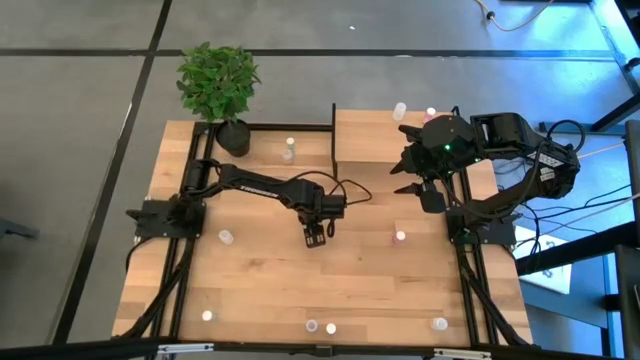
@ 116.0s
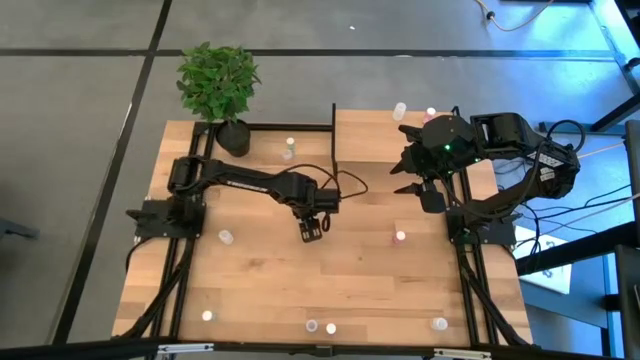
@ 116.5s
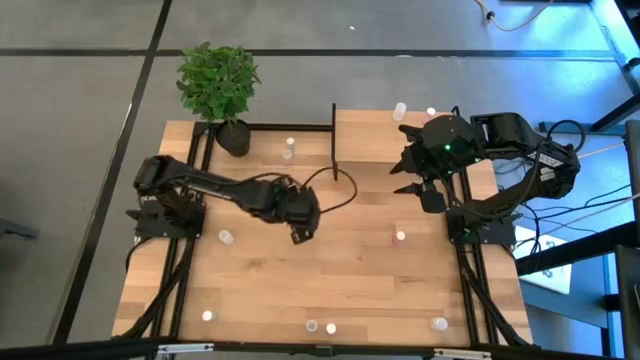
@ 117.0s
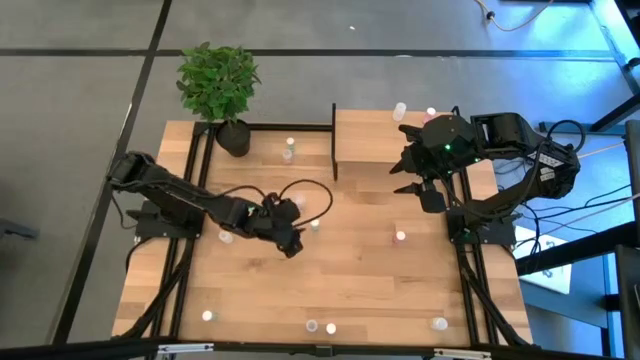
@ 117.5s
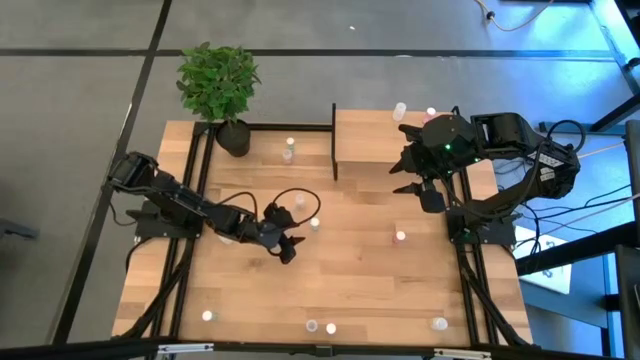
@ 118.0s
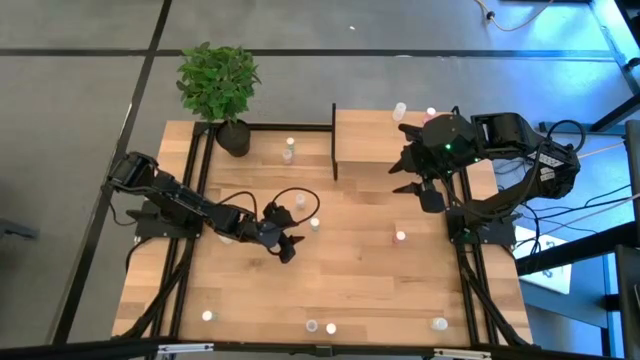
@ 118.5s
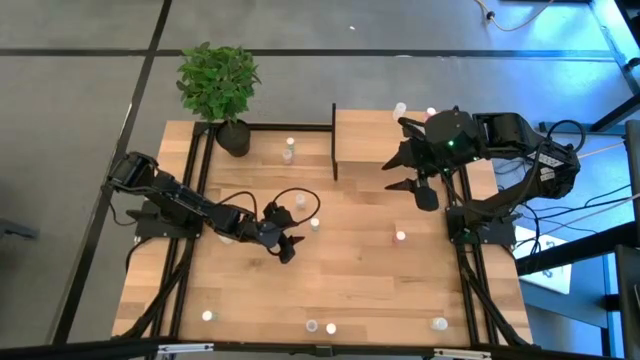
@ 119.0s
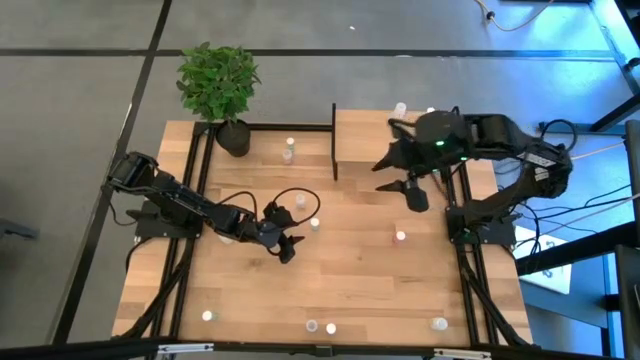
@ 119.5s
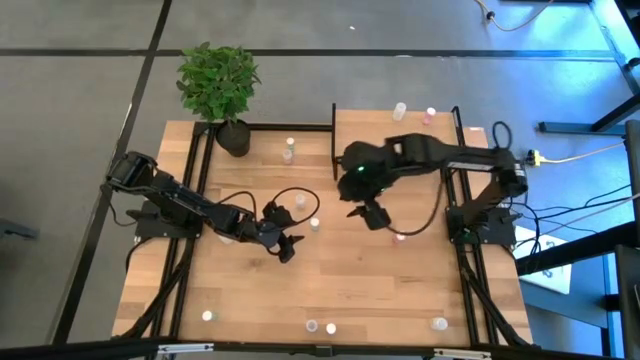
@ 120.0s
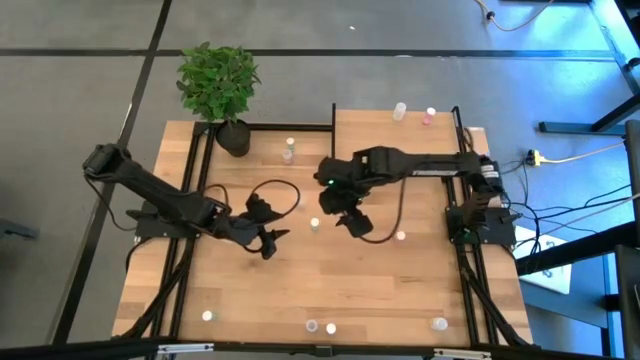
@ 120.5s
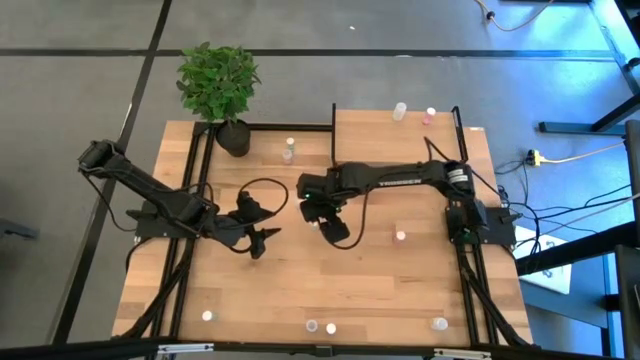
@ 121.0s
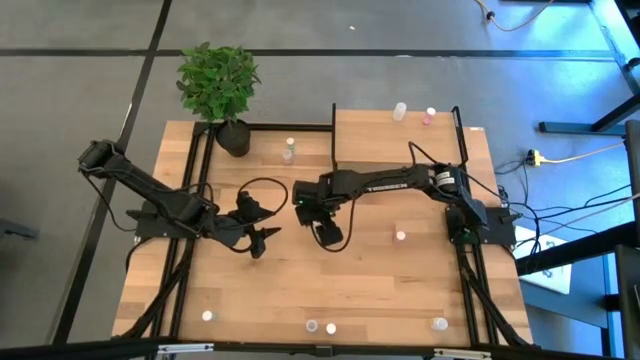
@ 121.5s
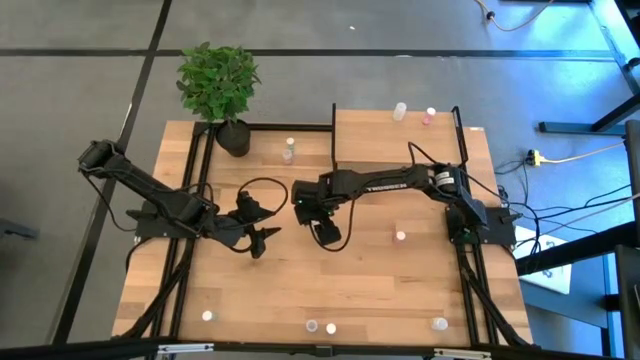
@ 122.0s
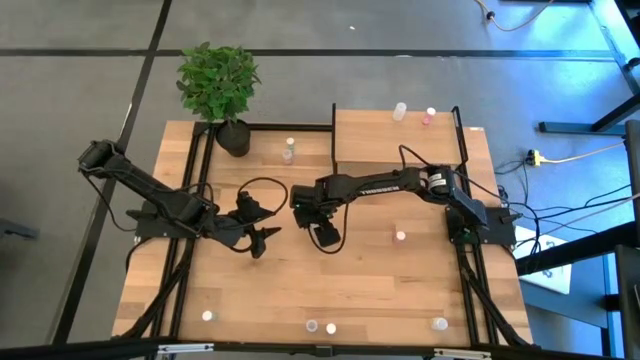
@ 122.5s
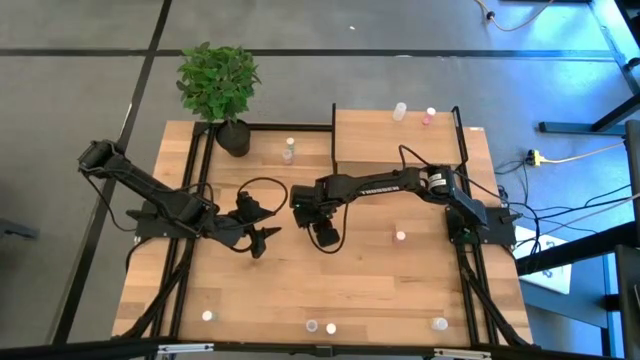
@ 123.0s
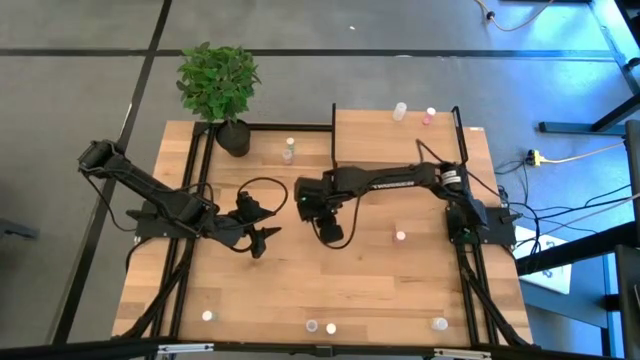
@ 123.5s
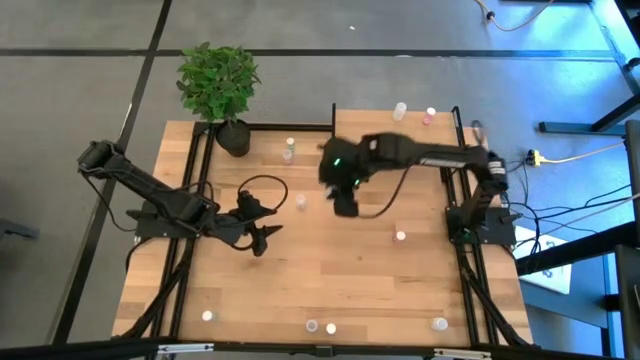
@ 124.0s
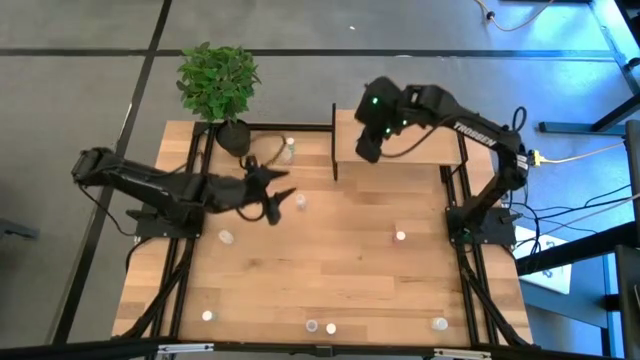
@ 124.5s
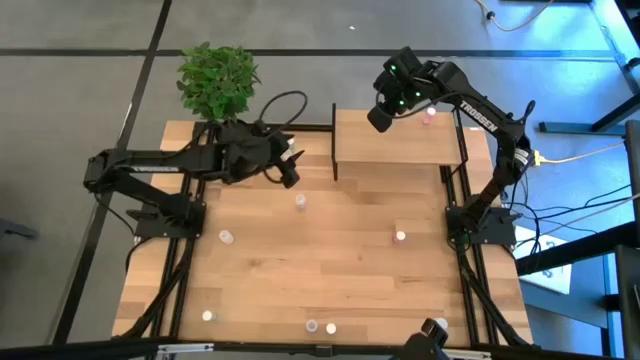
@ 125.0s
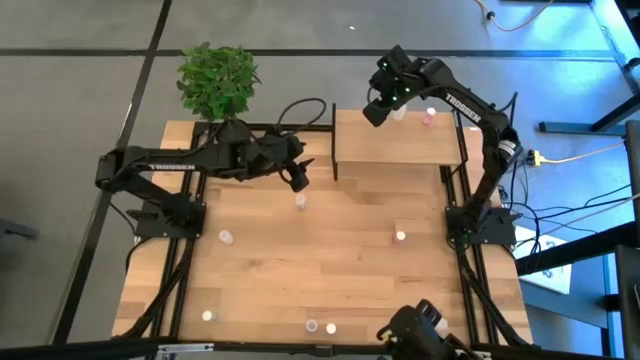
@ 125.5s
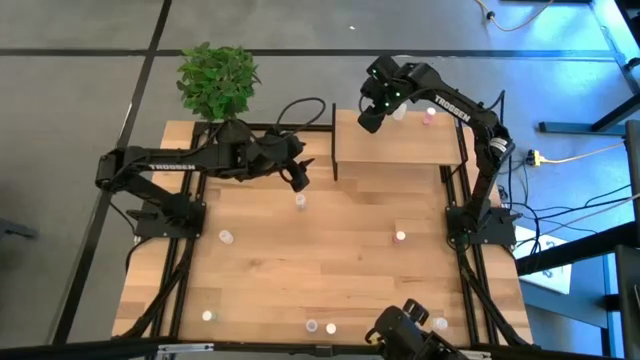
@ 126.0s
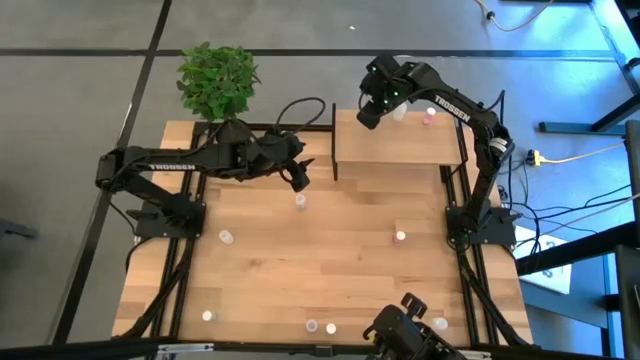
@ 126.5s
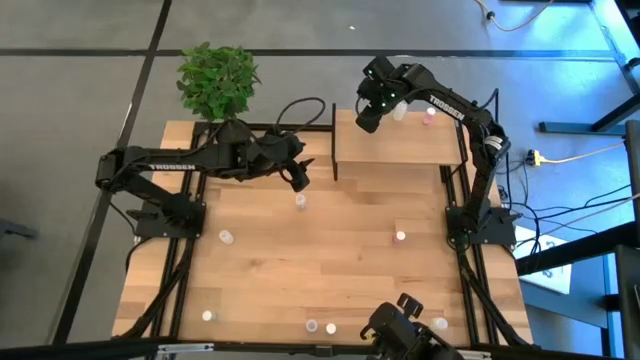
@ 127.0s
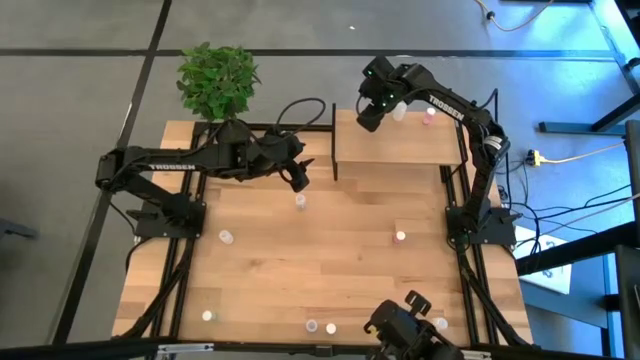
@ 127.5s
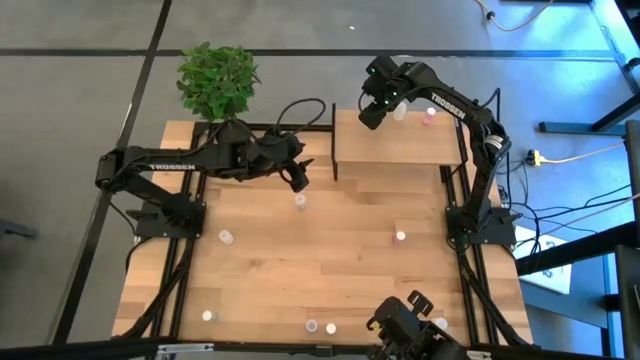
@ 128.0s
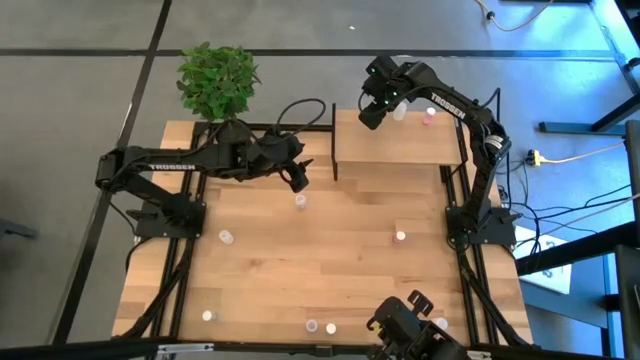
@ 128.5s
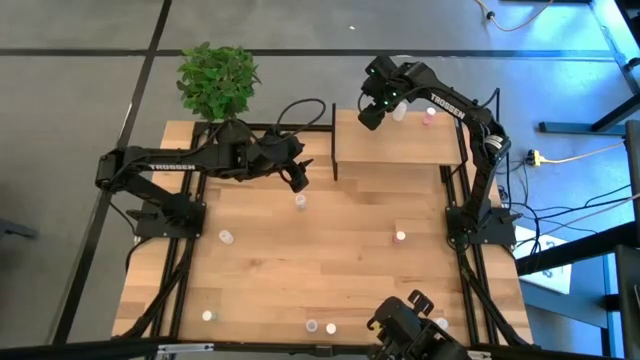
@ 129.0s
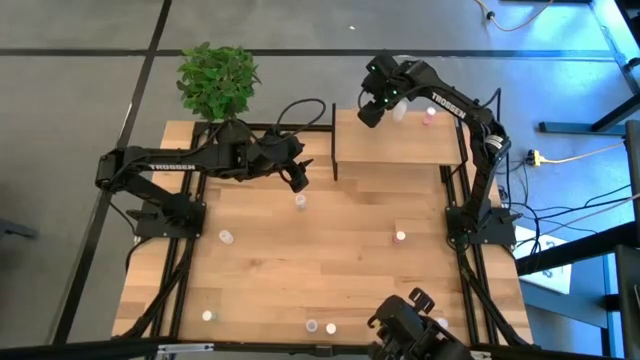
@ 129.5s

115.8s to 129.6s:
Task: Pick and place medicine bottles onto shelf by color
Put the middle green pill bottle on the shelf
